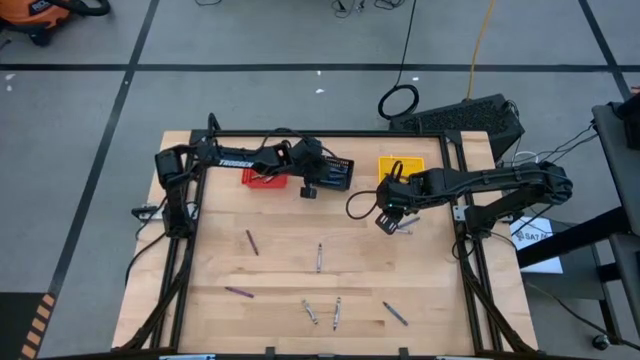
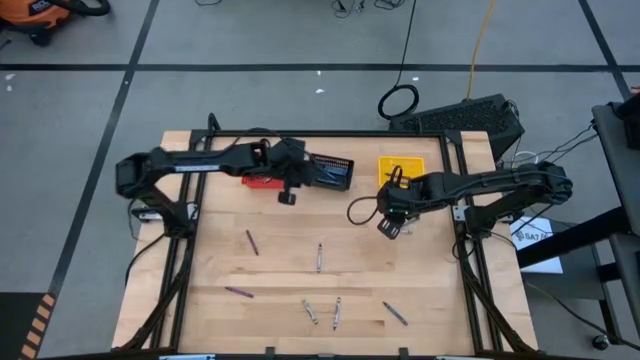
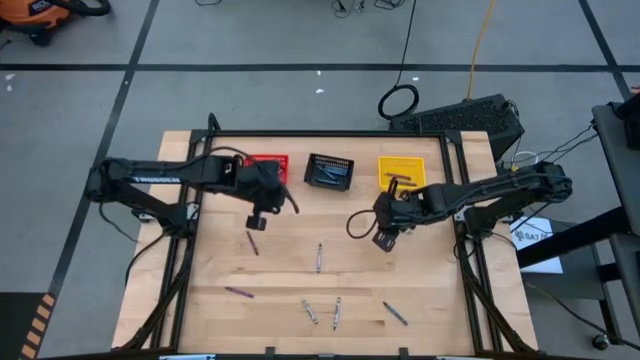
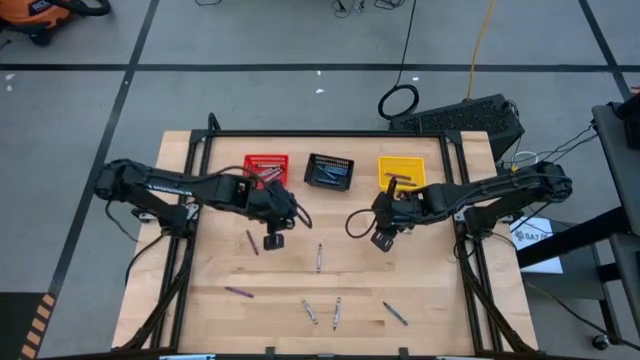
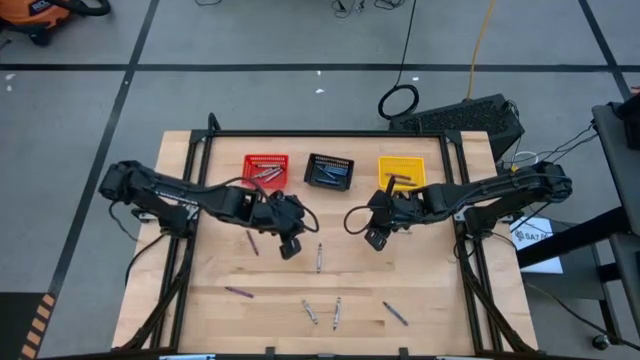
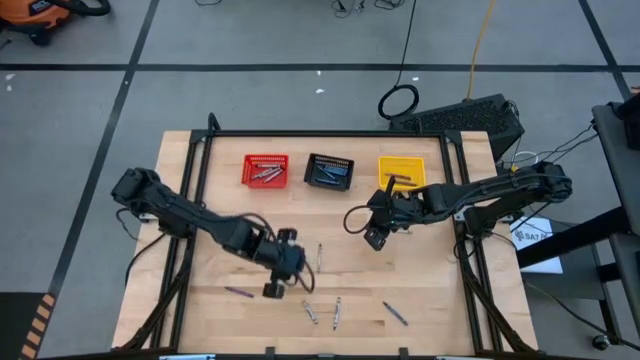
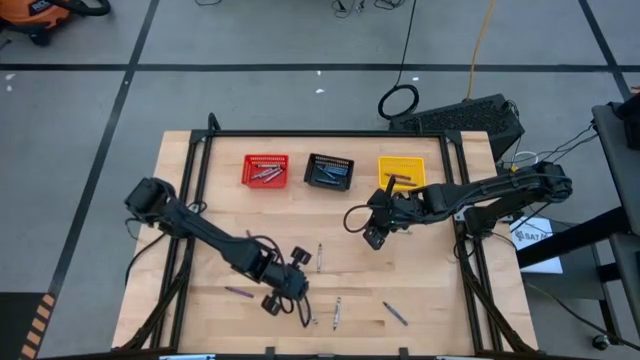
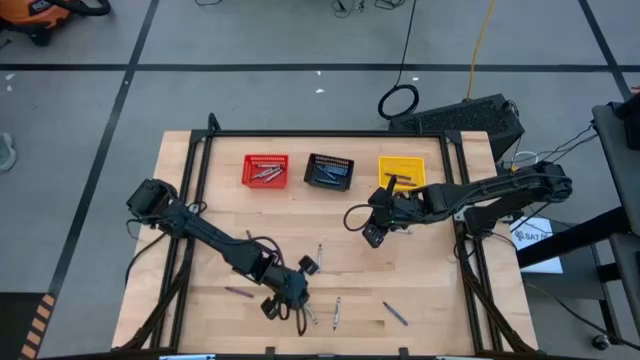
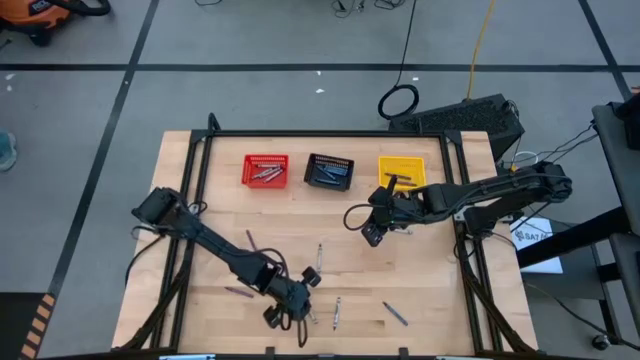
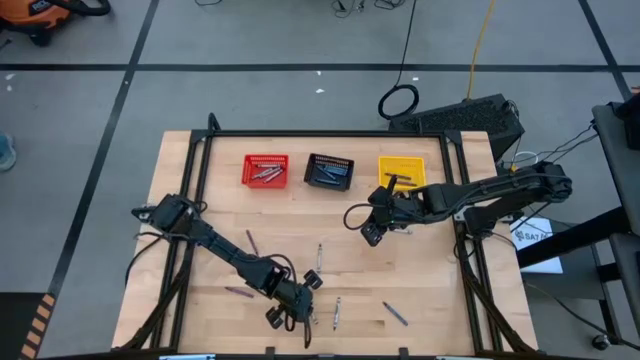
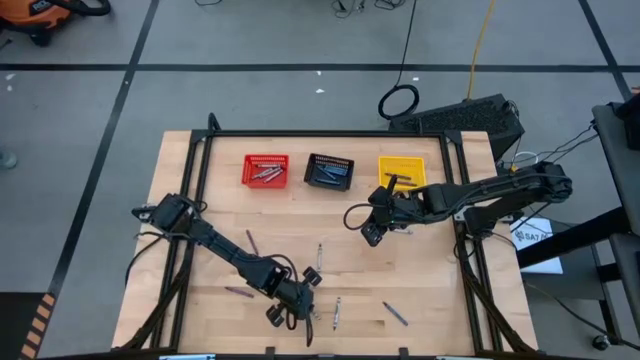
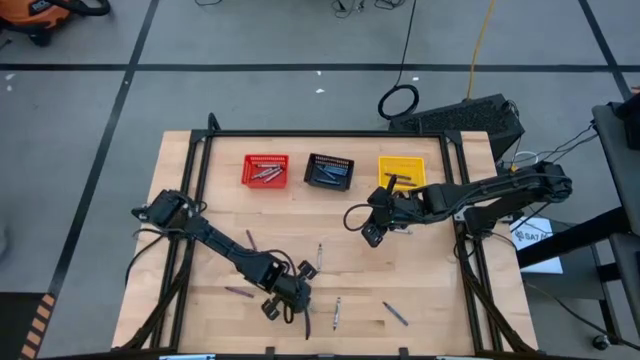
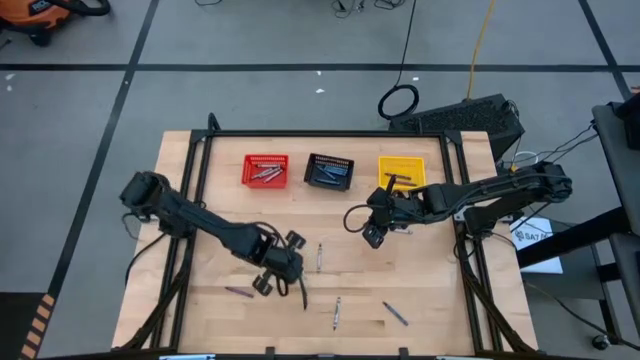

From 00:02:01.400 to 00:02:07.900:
Task: Sort crayons
Put the gray crayon into the red bin

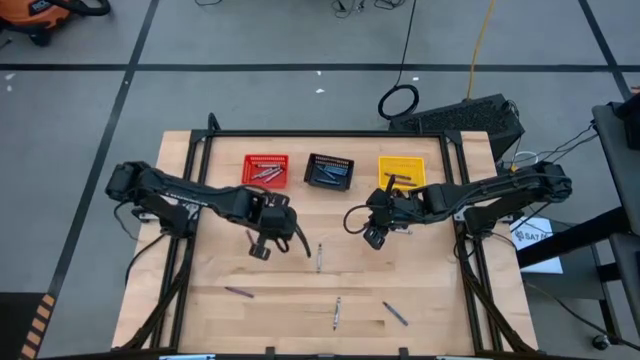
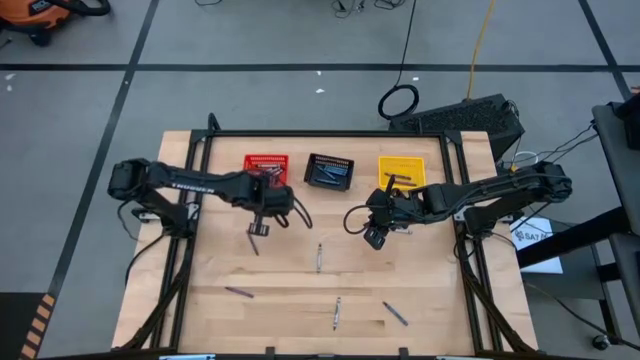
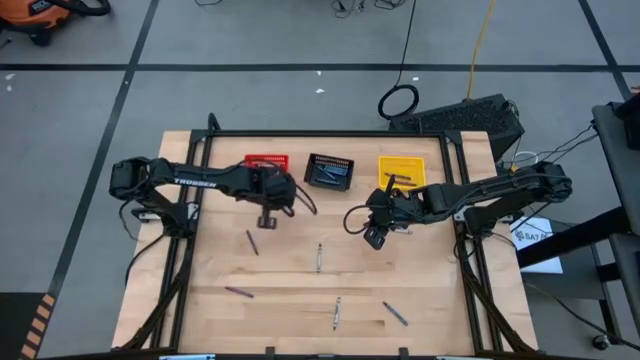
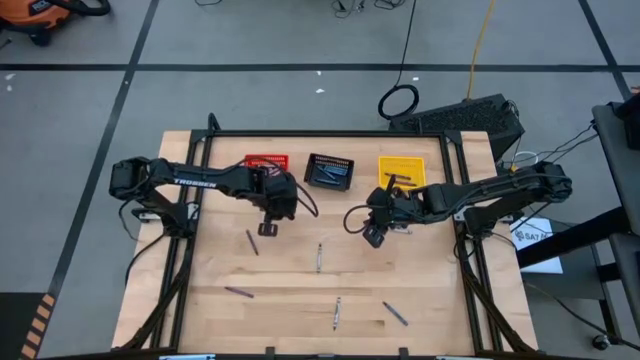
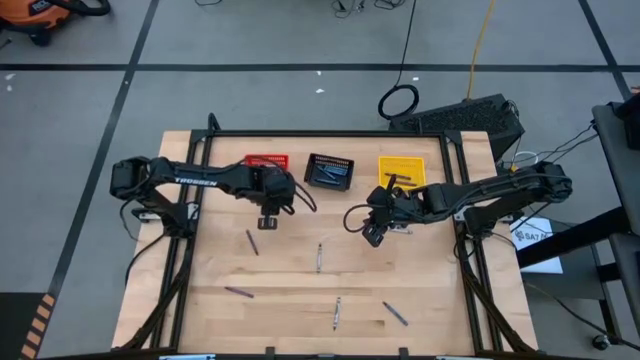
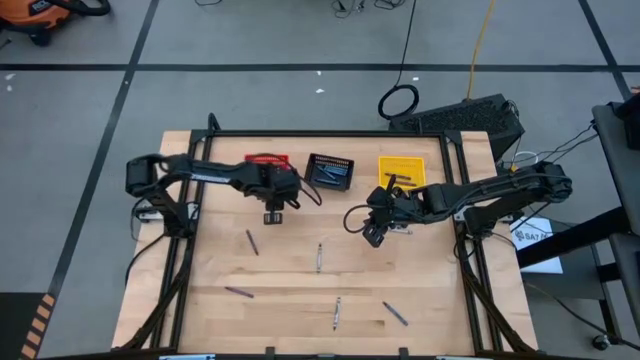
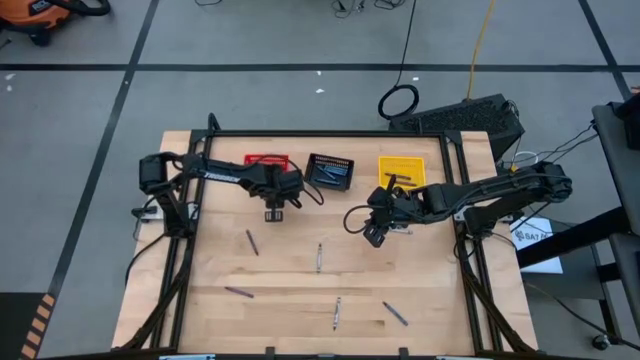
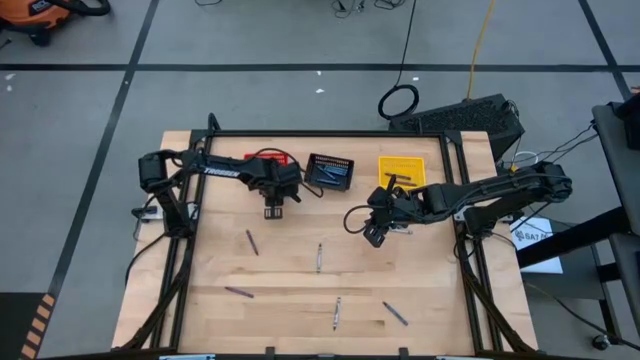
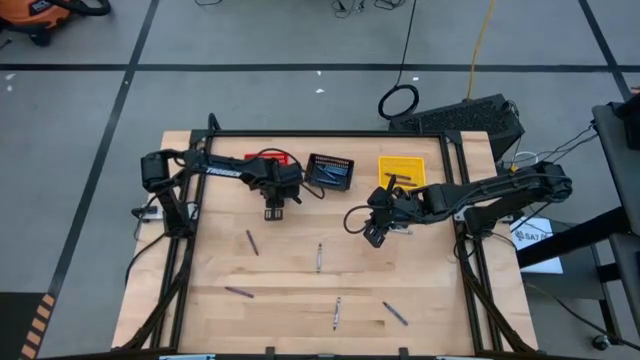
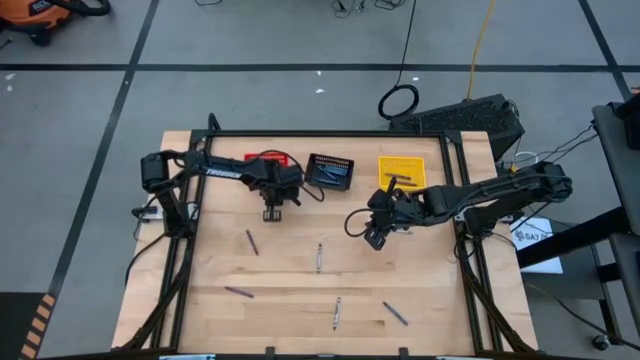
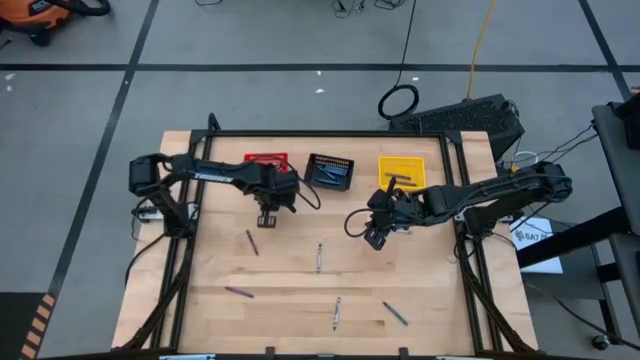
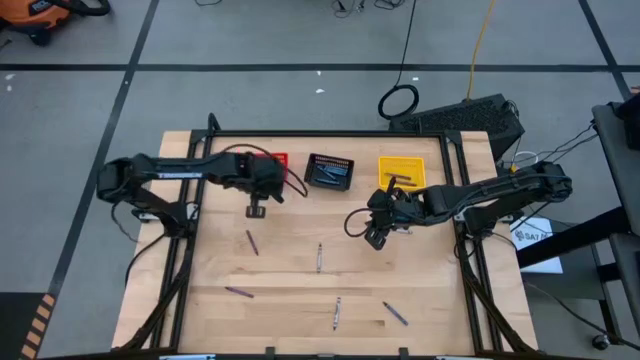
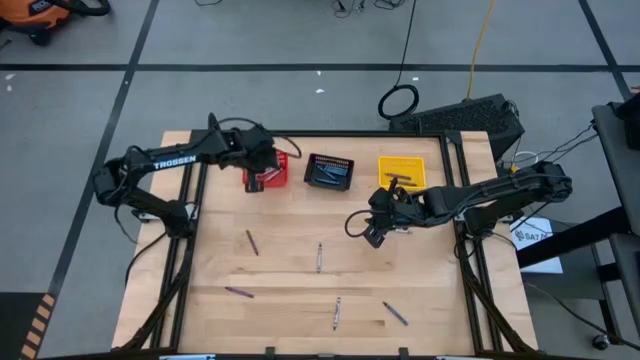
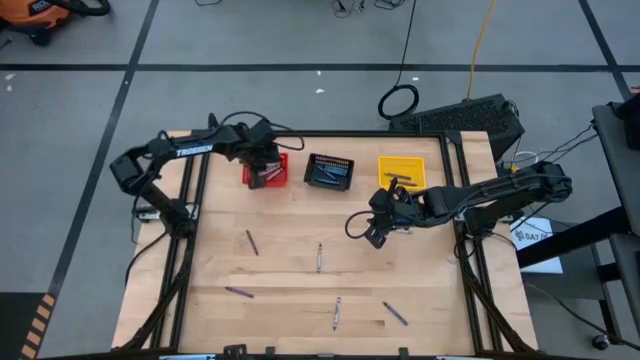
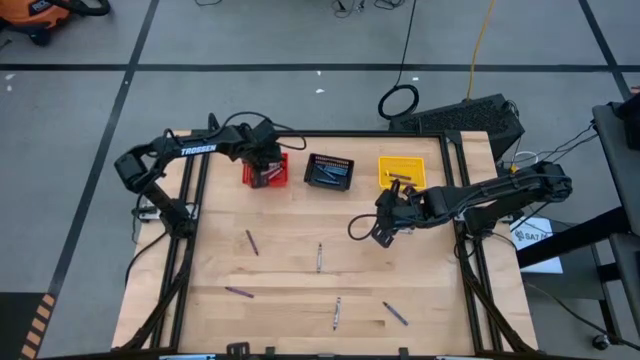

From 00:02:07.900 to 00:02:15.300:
Put the gray crayon into the red bin

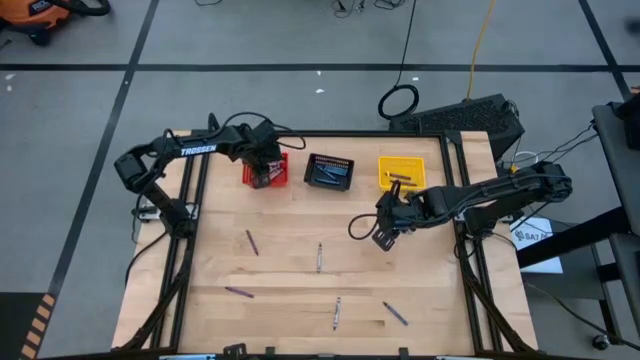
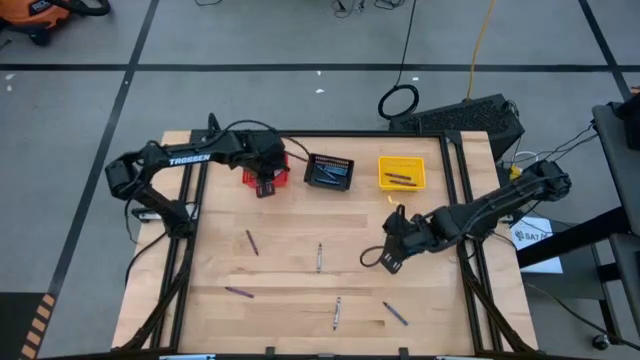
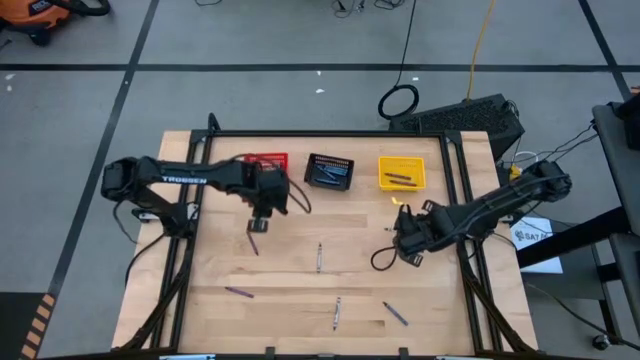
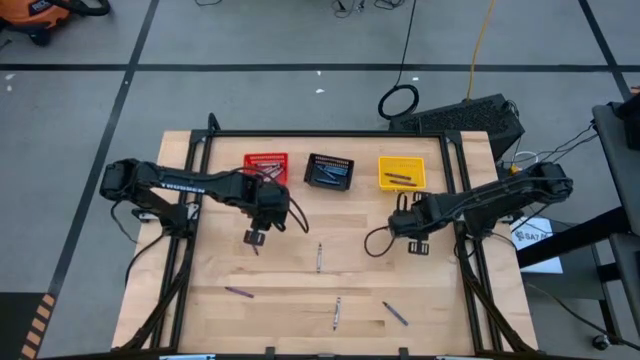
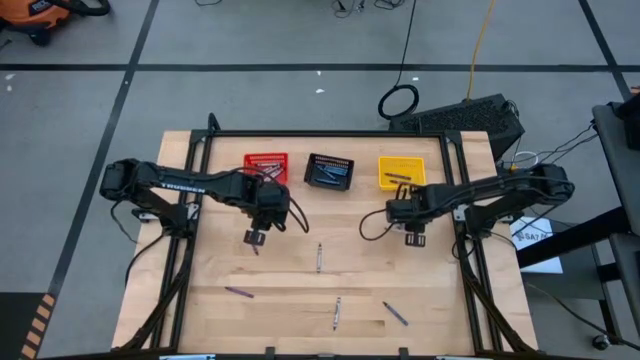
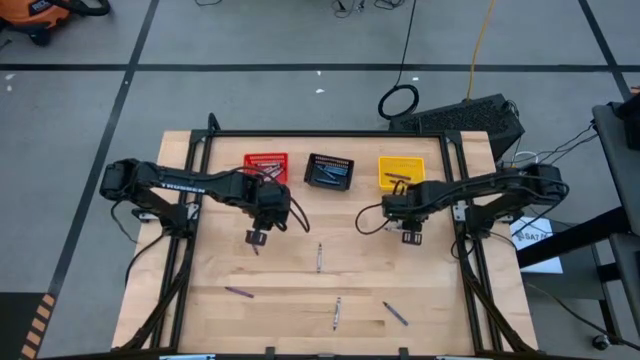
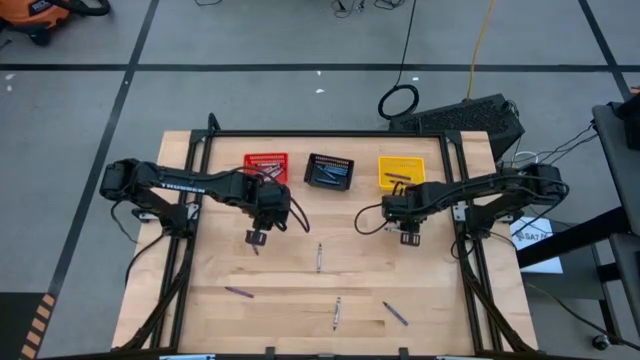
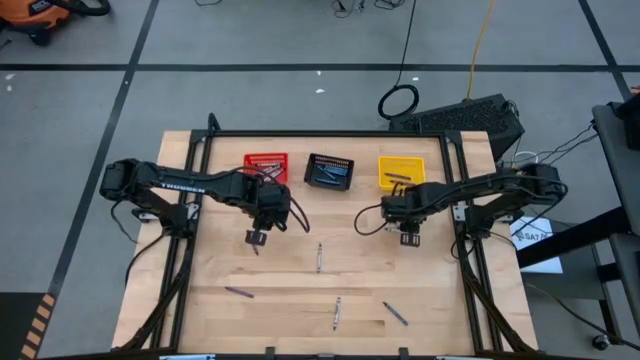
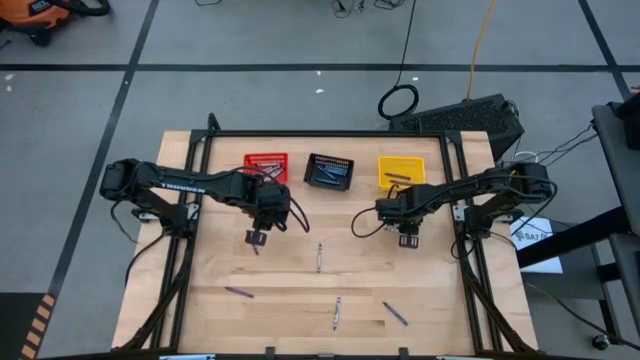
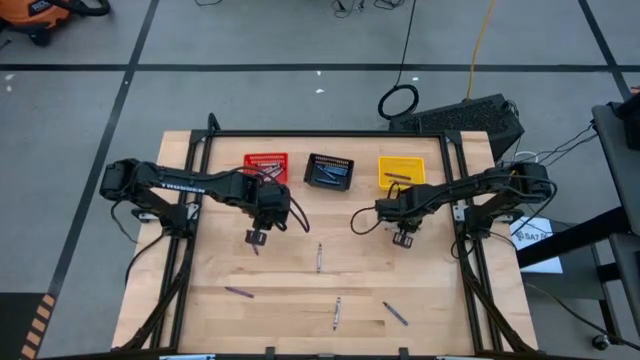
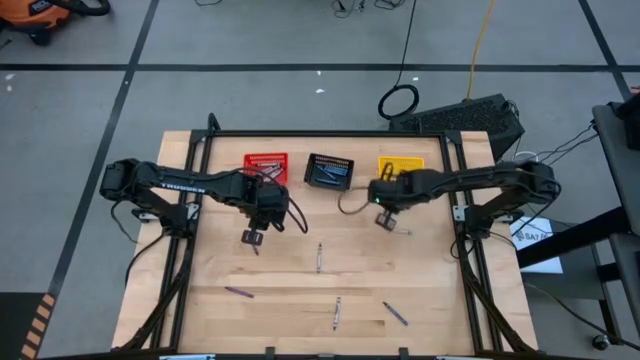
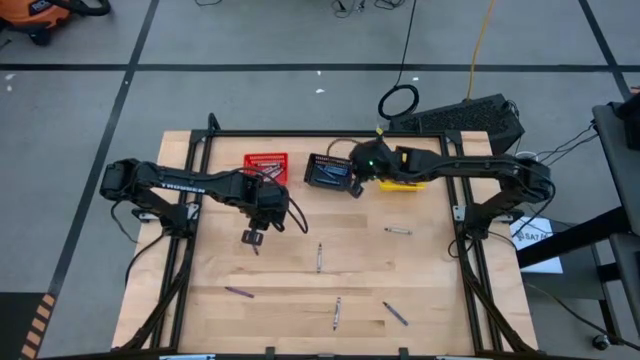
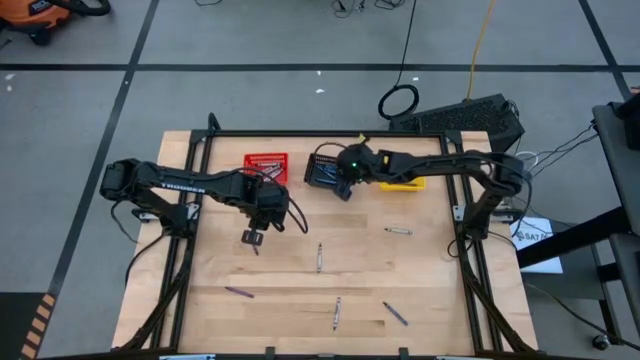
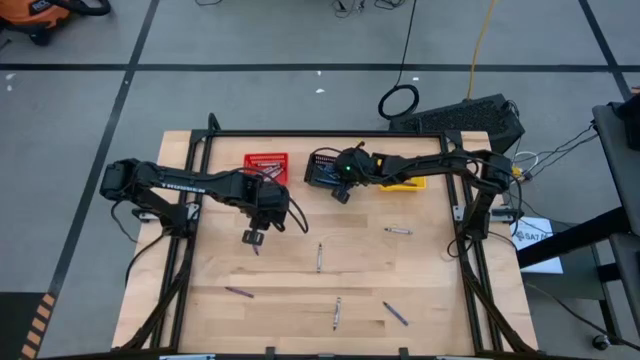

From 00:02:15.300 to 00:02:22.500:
Put the blue crayon into the black bin
